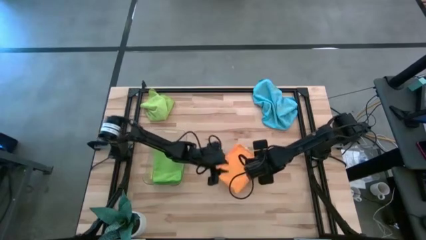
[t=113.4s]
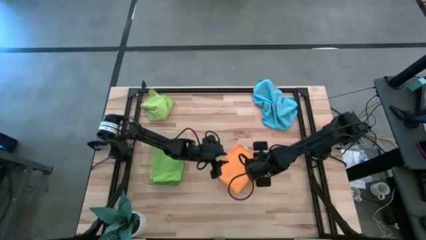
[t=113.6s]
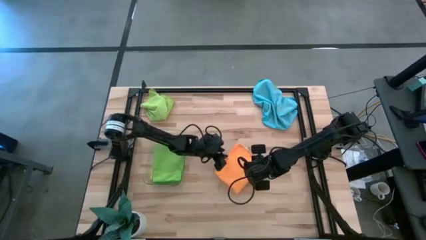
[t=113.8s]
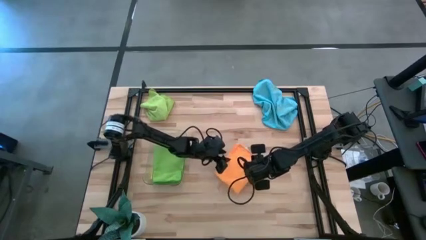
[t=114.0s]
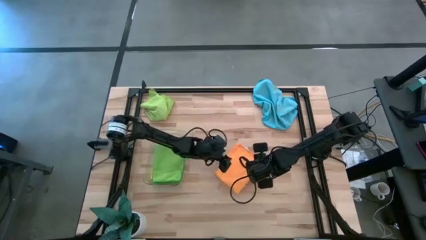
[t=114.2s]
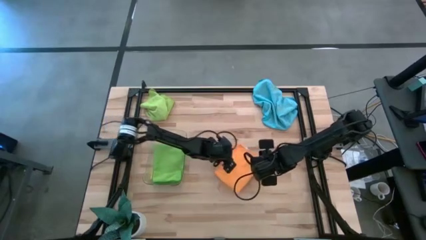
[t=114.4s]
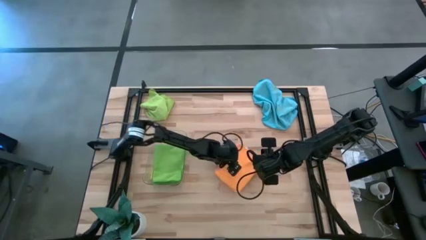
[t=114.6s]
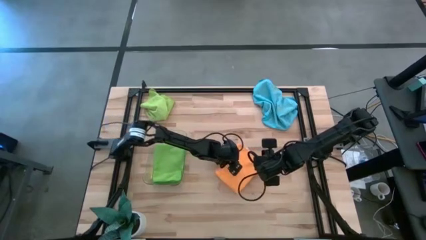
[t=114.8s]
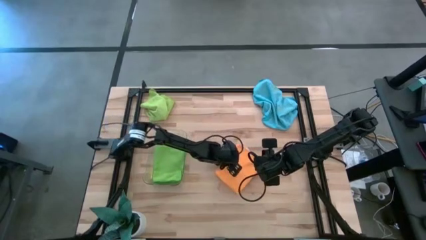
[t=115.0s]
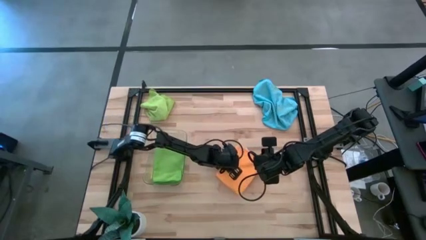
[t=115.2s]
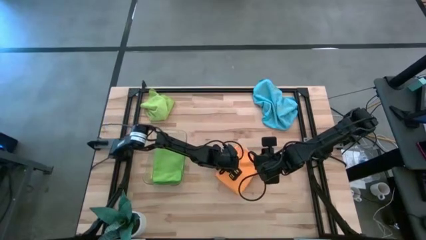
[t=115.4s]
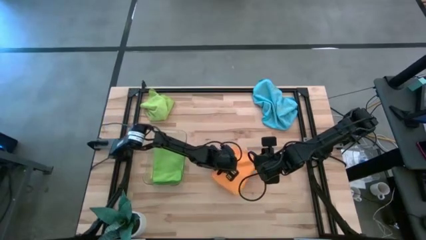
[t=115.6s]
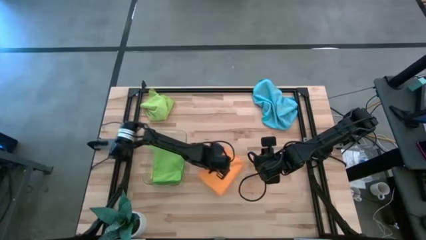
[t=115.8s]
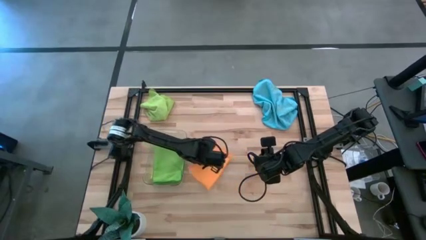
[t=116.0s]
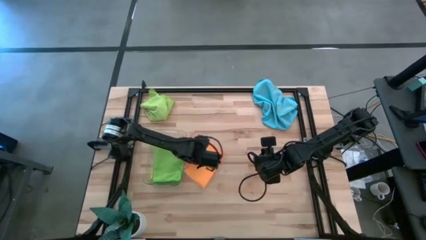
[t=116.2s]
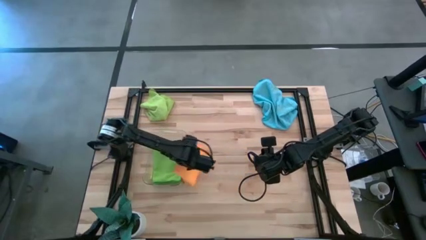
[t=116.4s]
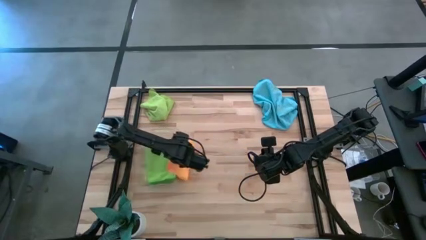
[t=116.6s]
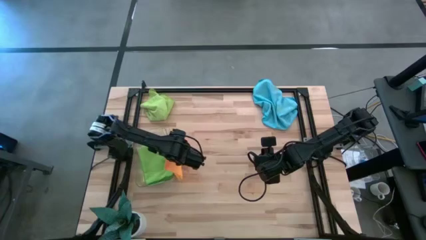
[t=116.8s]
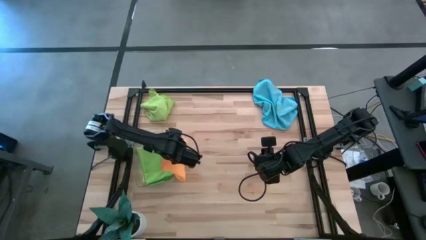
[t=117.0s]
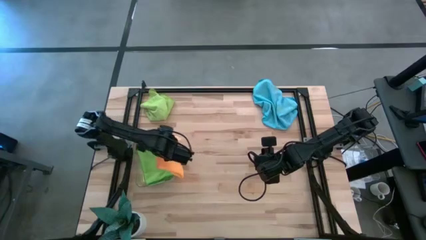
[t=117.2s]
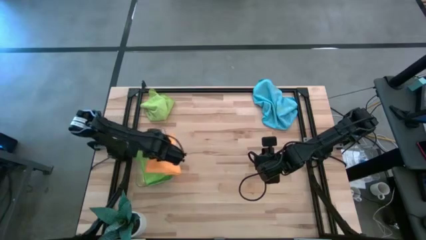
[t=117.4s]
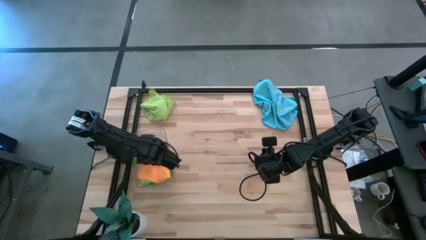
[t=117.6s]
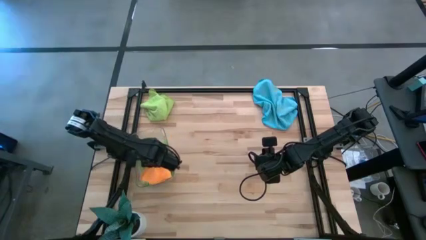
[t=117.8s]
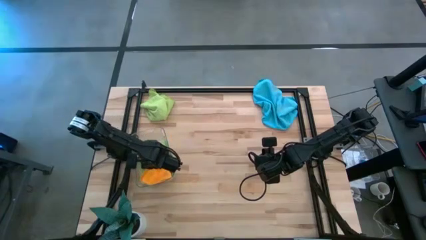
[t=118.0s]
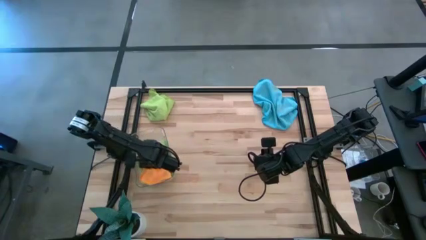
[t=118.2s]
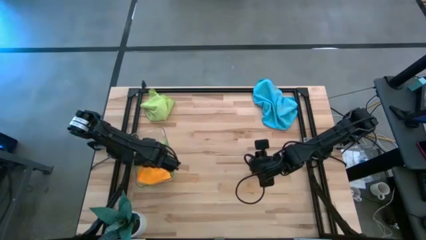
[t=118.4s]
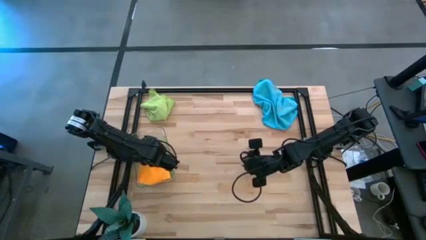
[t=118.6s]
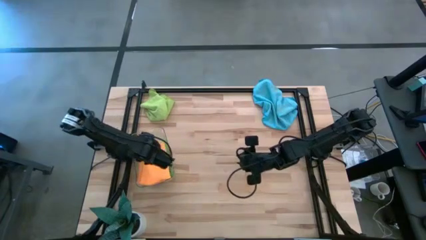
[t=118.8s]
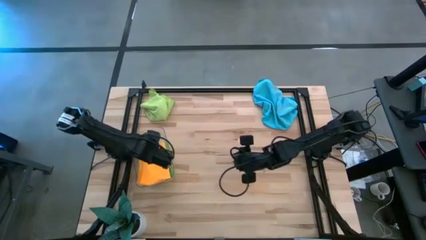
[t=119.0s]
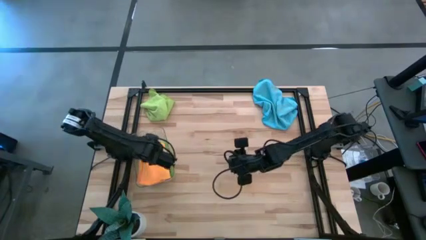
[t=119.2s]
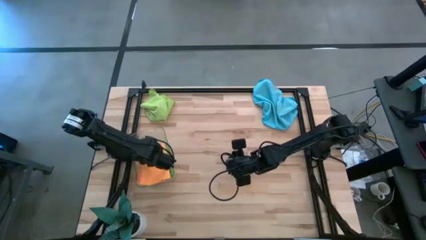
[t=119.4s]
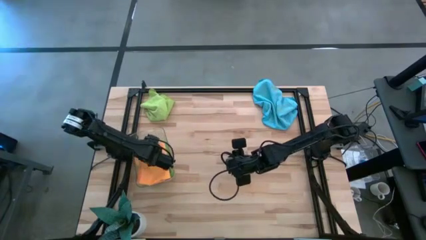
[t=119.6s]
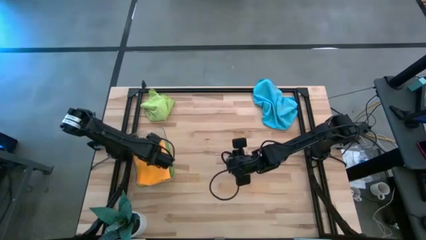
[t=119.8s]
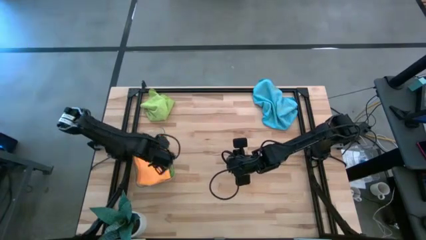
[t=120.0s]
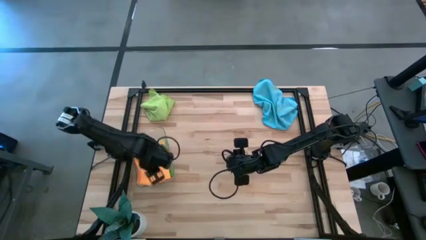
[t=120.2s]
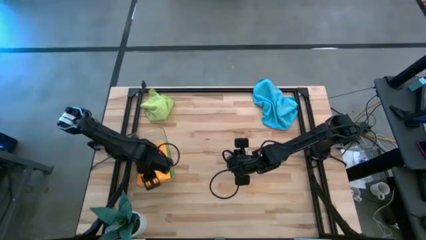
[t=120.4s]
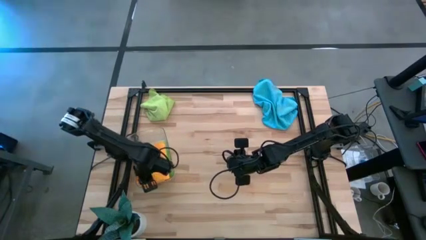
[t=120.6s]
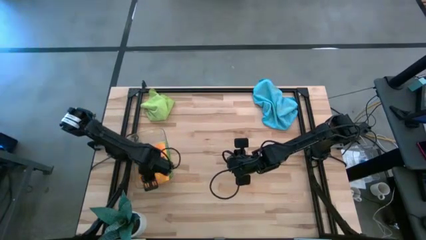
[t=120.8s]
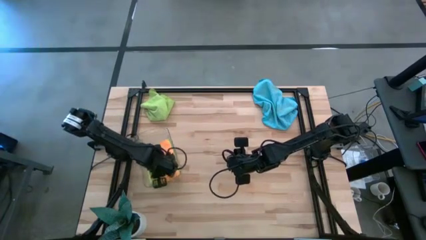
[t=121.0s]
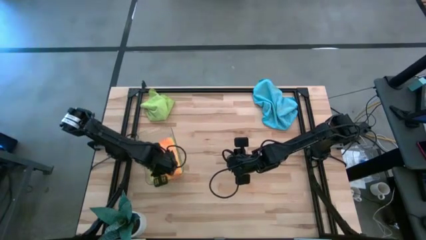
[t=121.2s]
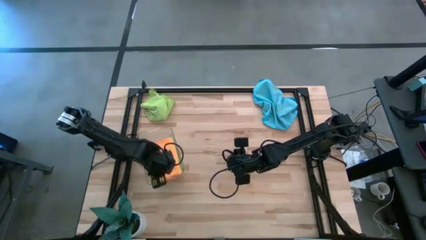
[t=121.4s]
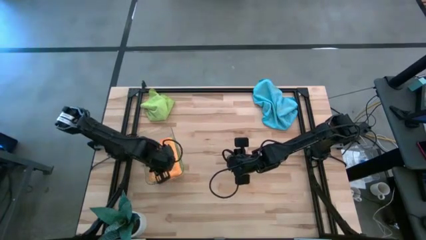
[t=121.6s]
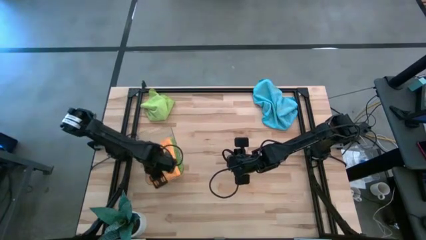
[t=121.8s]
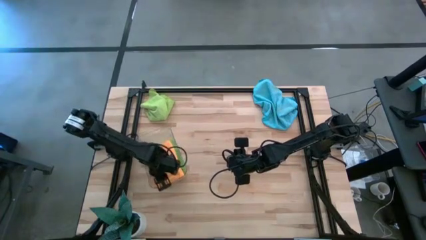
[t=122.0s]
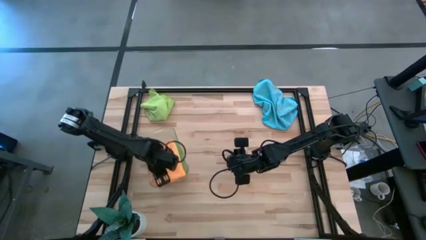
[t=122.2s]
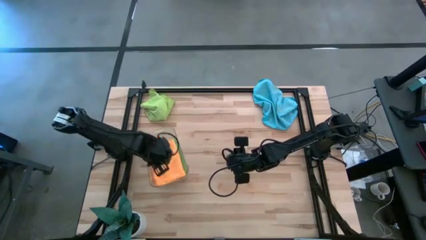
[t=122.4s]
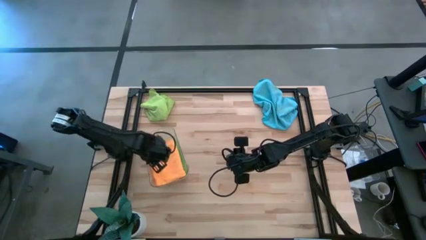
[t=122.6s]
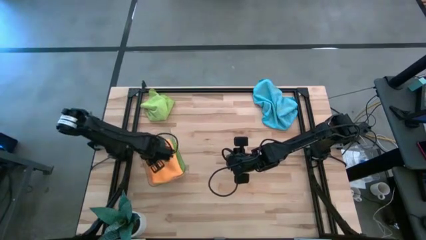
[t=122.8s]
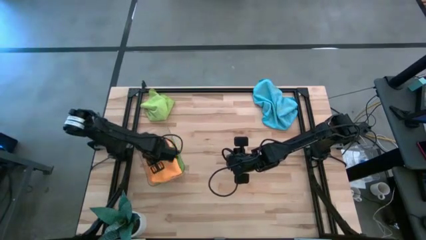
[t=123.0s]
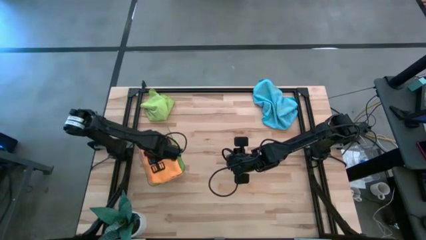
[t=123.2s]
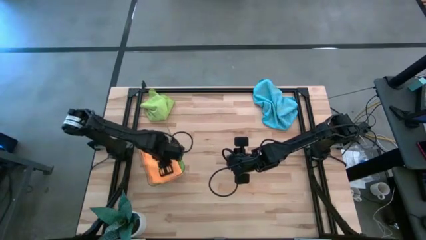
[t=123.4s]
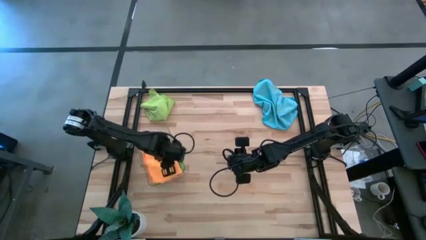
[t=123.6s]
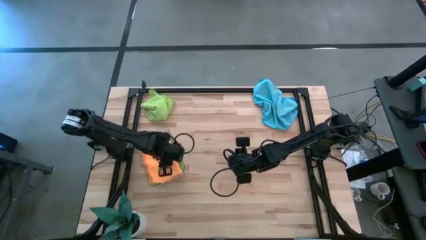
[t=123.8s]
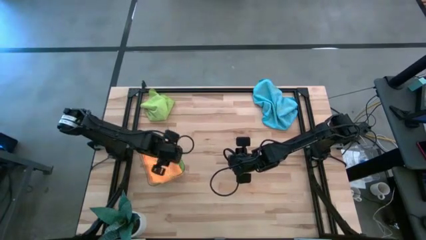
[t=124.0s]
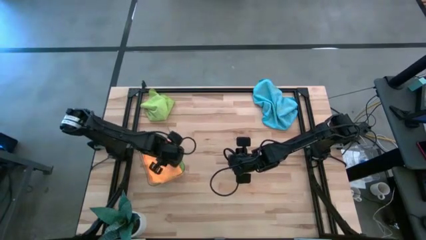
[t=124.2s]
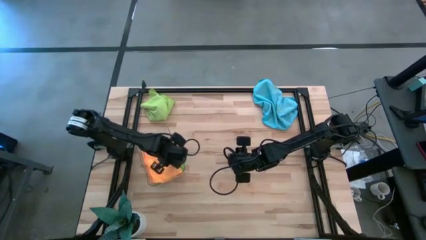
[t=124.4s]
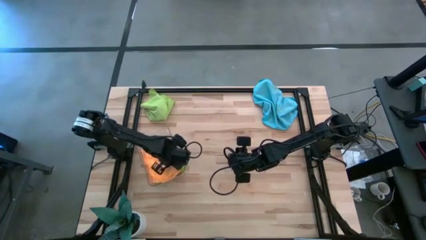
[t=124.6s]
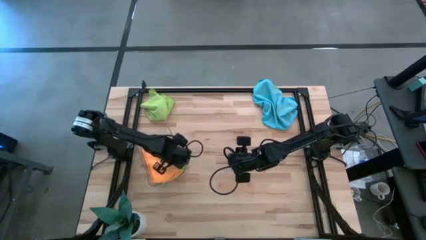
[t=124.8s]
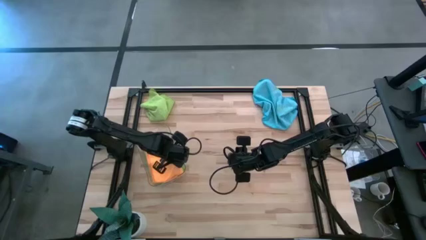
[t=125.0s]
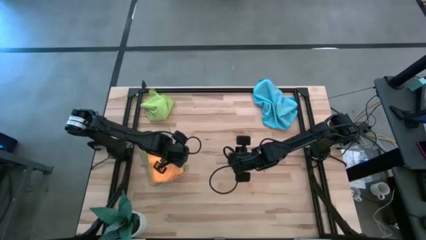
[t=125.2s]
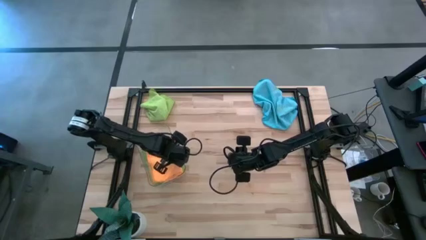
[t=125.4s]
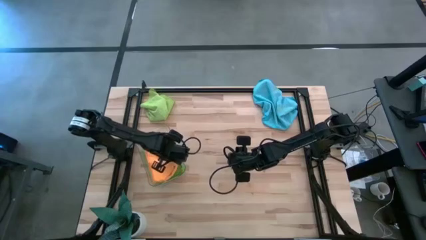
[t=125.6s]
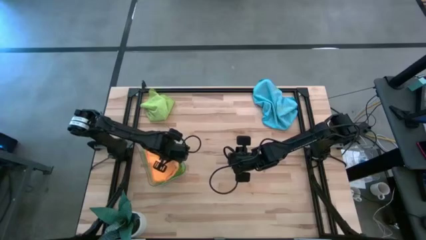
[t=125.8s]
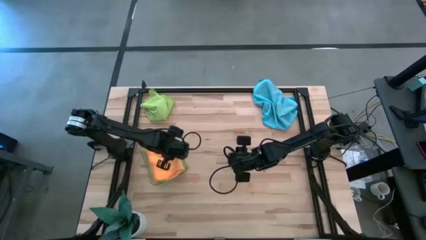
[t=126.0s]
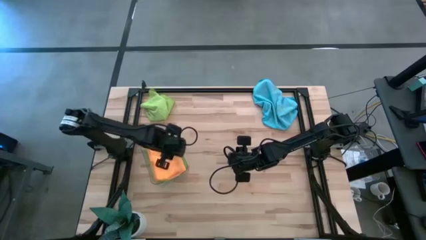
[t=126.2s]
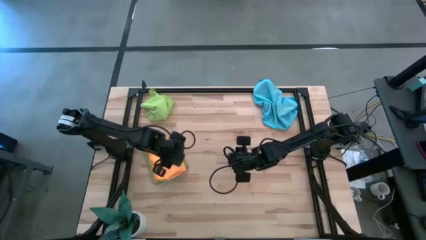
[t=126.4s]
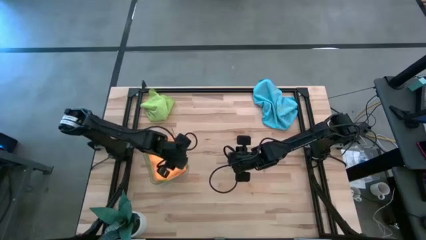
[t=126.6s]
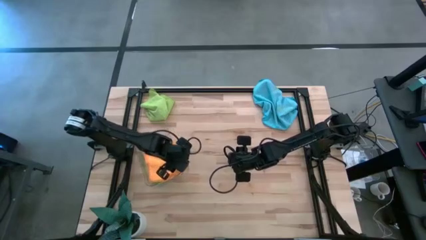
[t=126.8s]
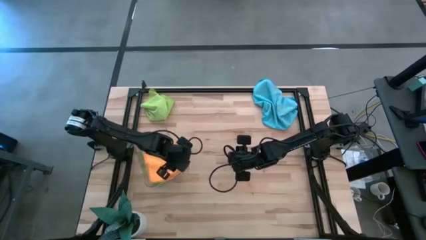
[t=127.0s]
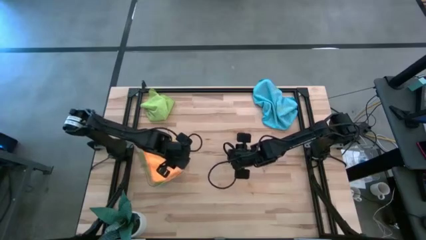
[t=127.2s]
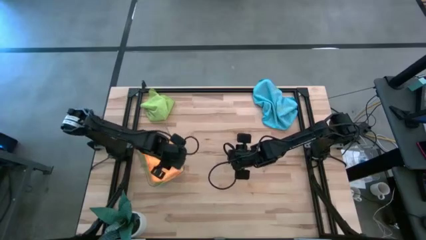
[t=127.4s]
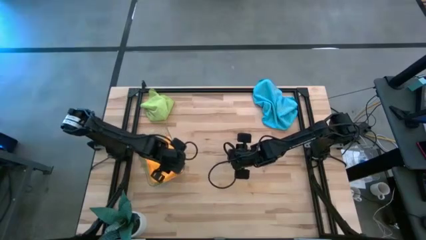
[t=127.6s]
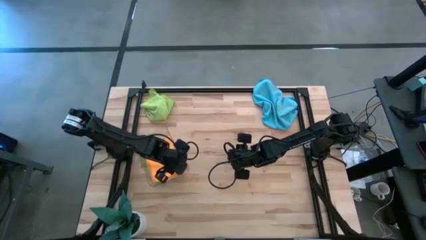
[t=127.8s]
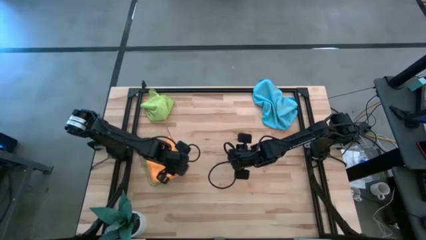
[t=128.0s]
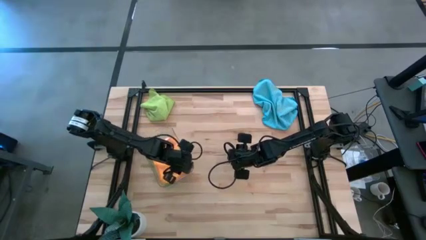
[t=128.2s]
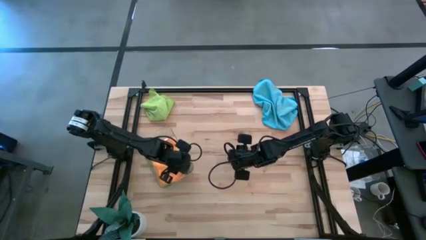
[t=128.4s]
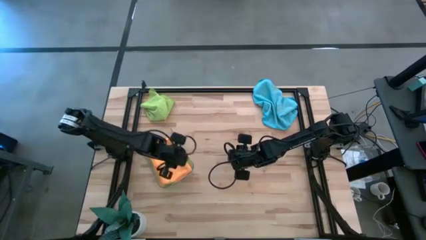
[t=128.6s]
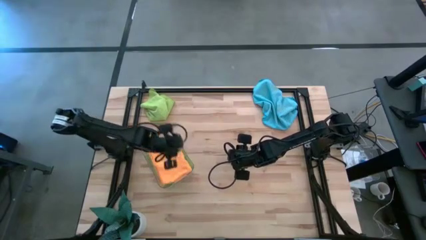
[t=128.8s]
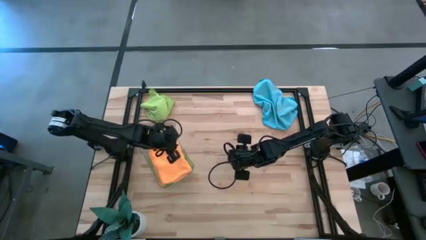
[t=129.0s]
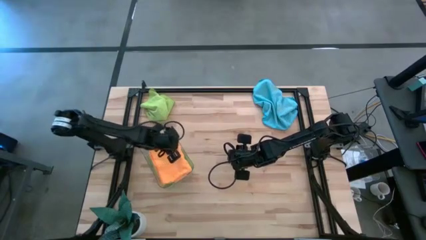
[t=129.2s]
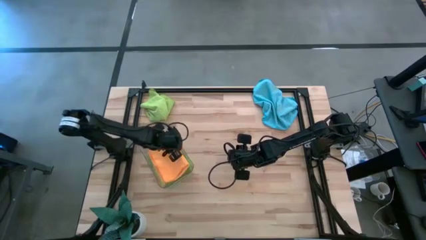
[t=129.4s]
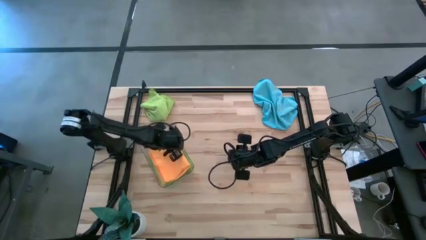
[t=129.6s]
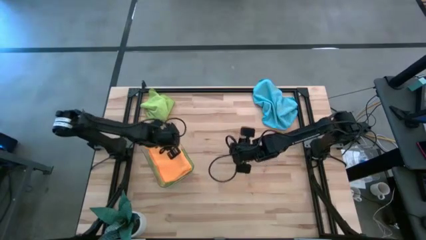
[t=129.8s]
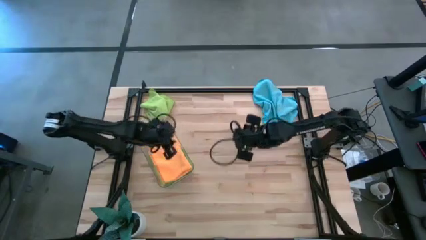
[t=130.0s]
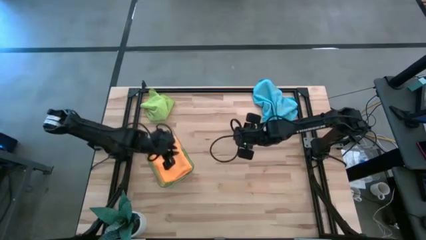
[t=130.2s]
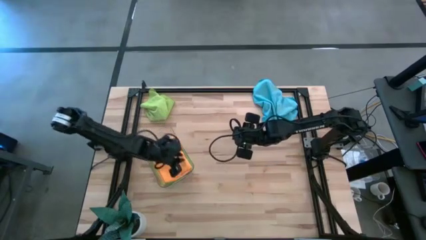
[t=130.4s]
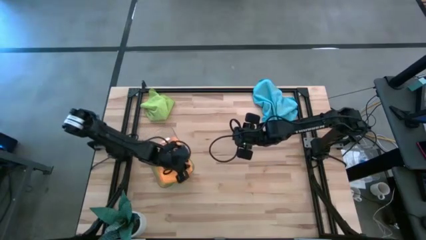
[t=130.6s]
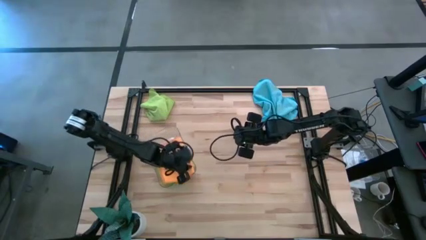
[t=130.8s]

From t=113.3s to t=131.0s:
Task: Fold microfiber towels
Put the folded orange microfiber towel into the transparent bin
